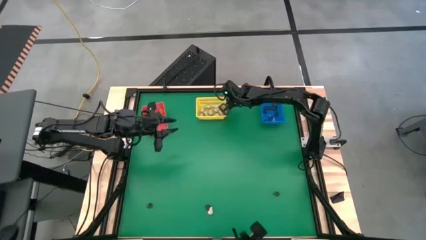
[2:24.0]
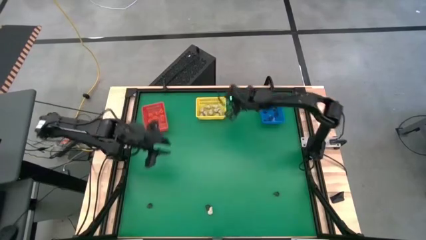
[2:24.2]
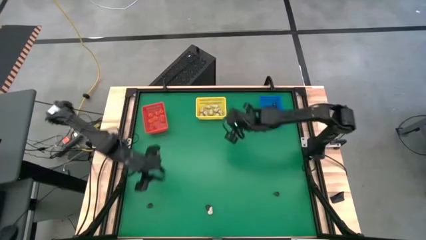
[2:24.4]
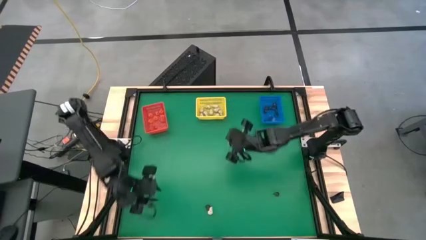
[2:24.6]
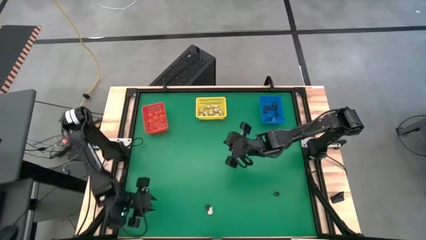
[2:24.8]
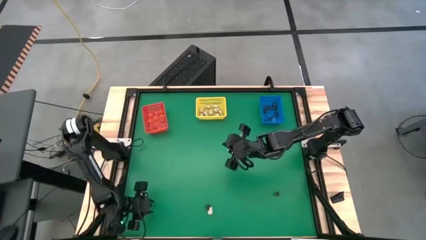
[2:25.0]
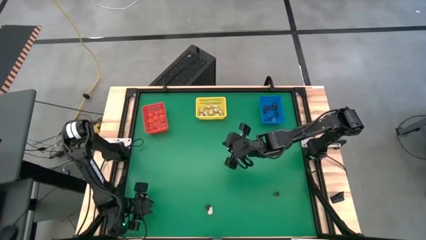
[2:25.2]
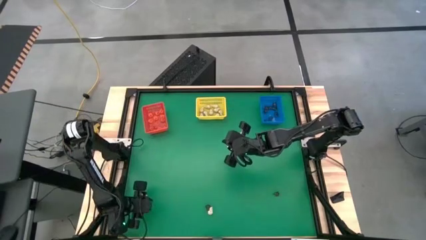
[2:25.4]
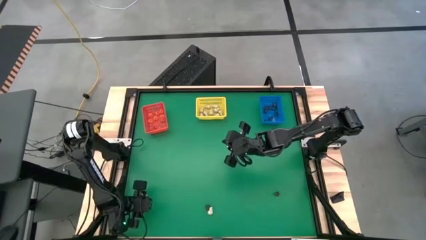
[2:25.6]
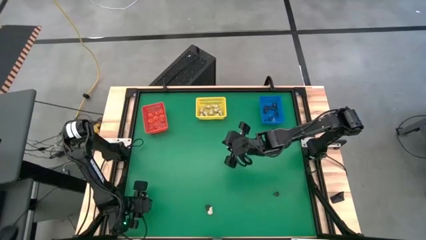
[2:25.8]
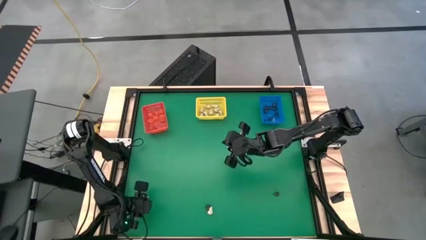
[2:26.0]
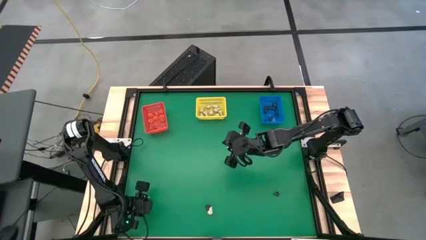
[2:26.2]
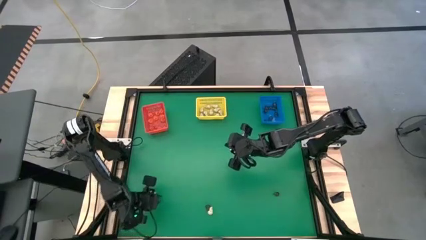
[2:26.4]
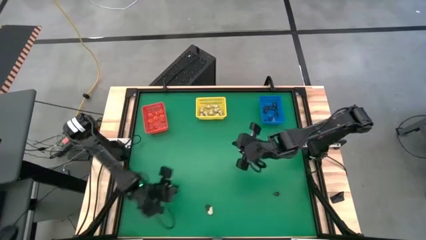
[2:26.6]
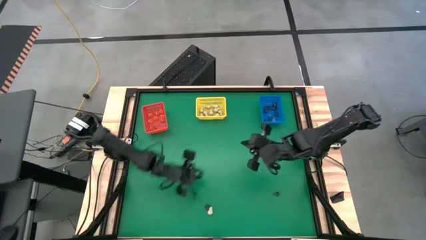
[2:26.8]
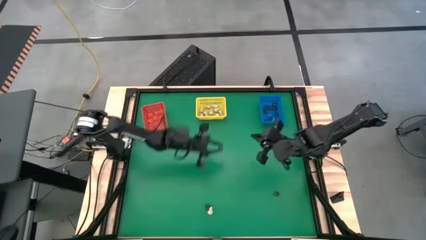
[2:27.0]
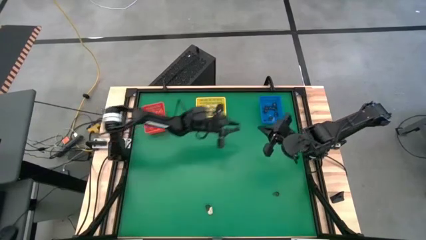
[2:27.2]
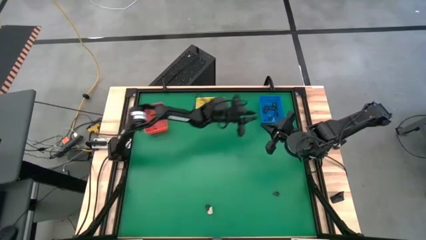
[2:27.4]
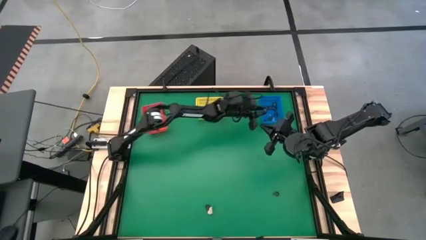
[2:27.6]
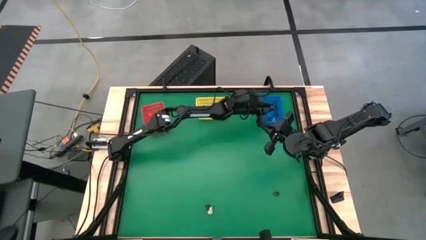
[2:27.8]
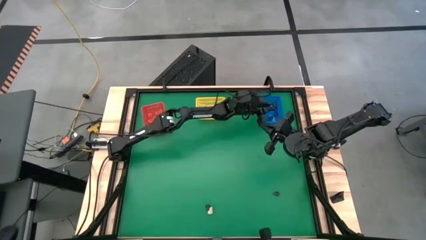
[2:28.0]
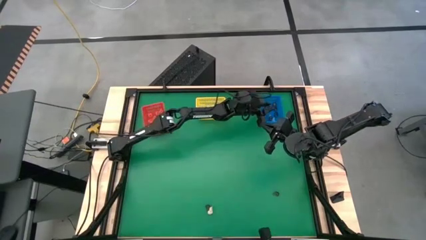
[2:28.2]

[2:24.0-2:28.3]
Task: Sort Halloween decoration
Put the purple skull toy into the blue bin

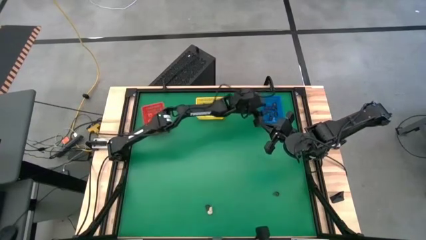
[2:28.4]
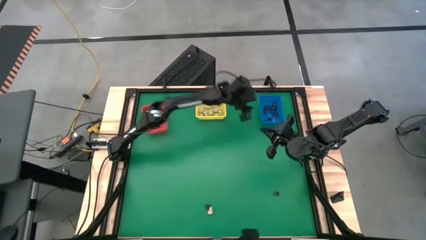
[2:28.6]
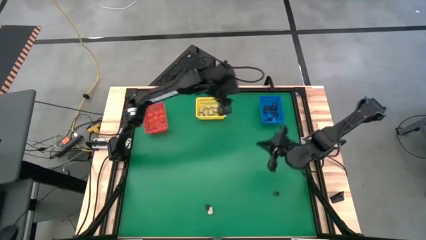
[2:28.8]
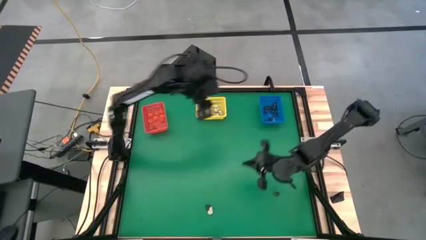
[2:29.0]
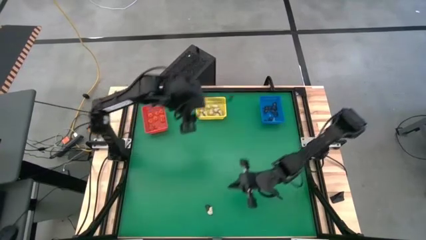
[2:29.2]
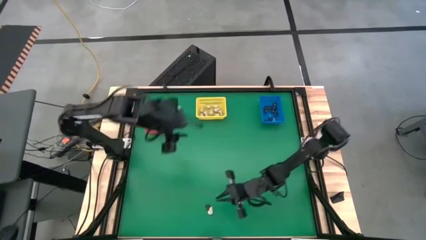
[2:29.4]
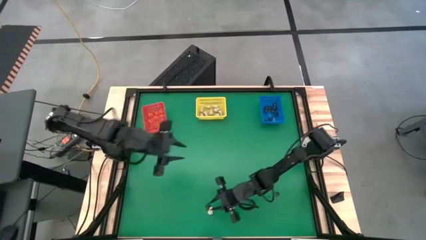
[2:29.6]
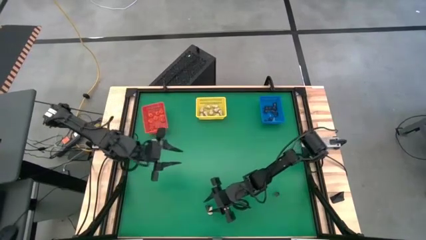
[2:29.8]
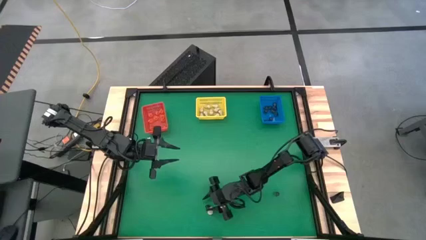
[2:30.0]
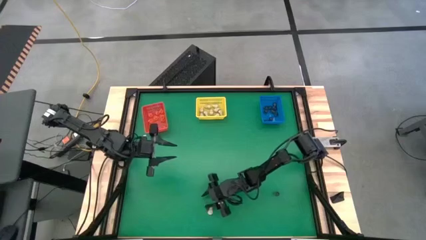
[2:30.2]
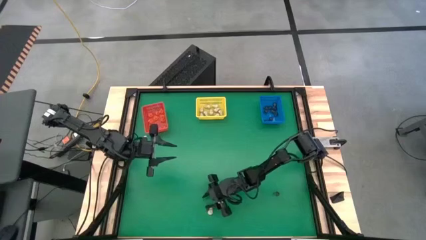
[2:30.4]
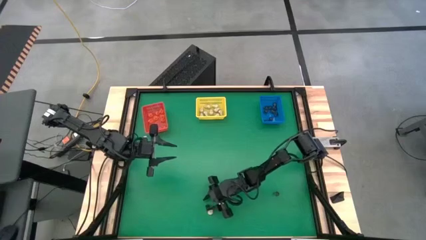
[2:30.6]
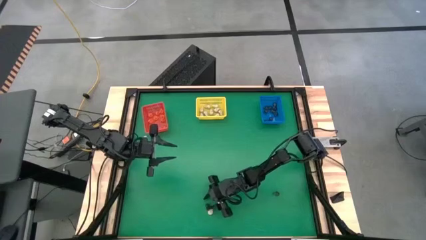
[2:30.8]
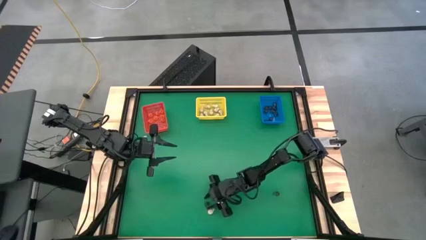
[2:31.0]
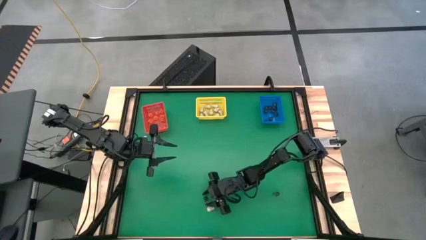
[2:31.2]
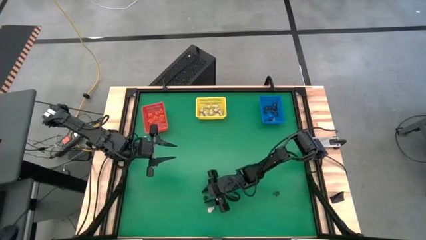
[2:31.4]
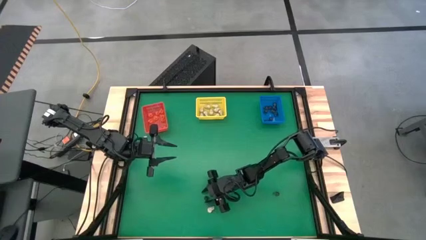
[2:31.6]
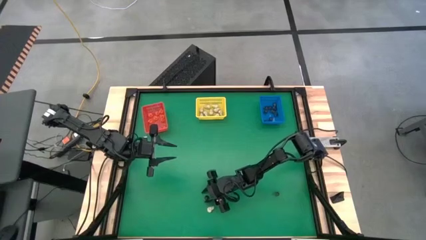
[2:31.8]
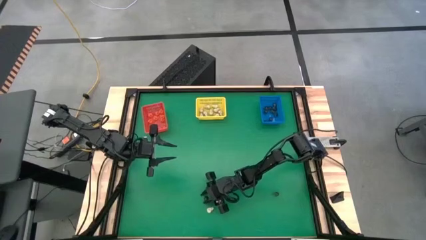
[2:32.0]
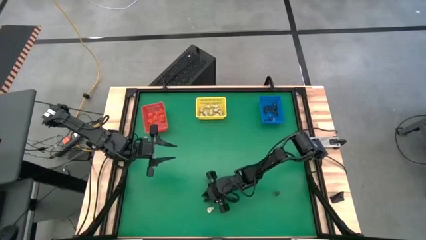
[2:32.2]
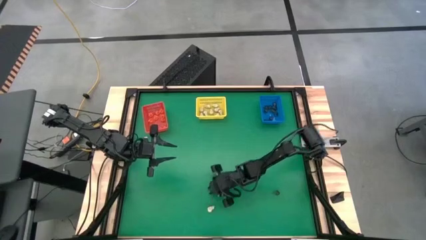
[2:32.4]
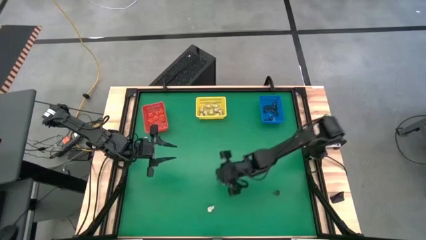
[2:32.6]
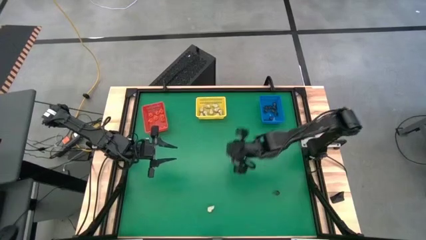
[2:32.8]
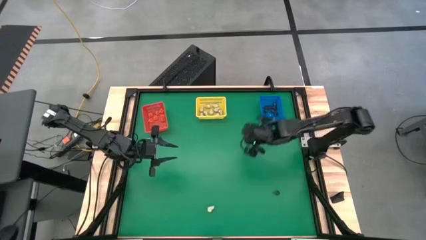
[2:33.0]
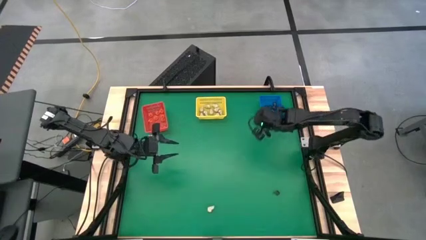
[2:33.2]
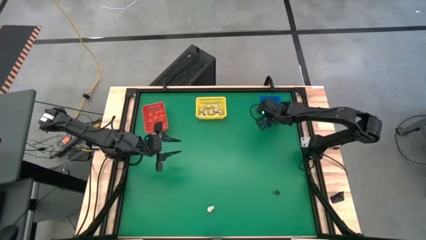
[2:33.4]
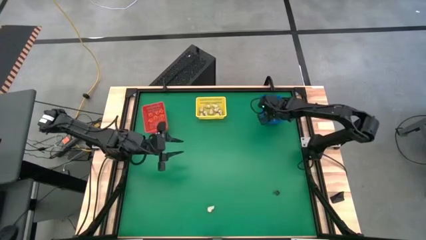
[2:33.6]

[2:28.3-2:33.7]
Put the purple skull toy into the blue bin

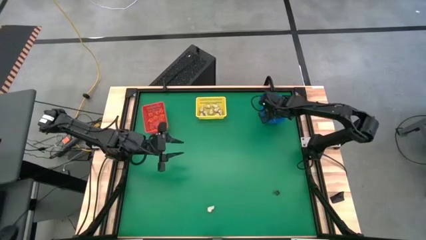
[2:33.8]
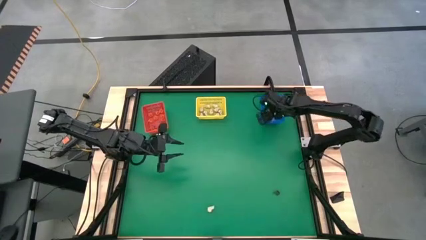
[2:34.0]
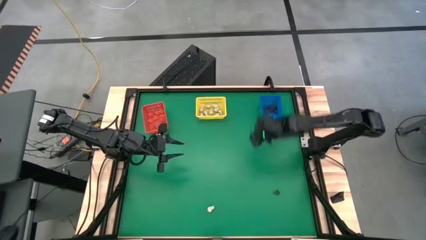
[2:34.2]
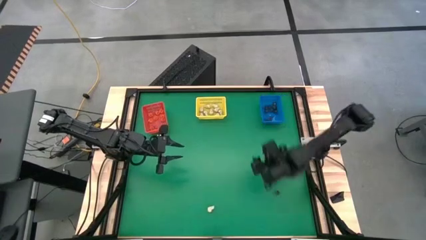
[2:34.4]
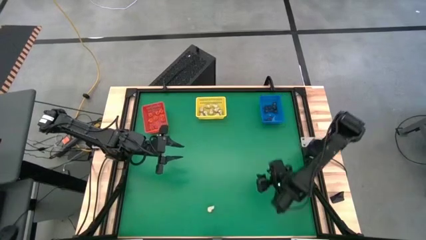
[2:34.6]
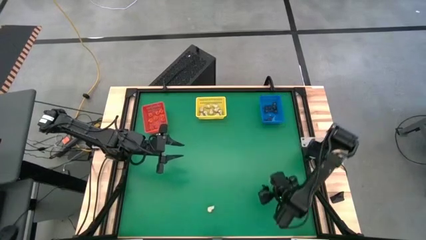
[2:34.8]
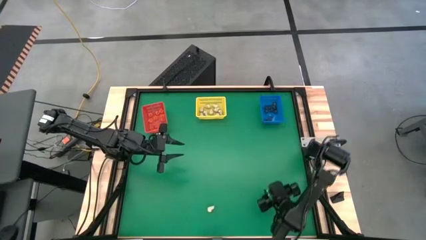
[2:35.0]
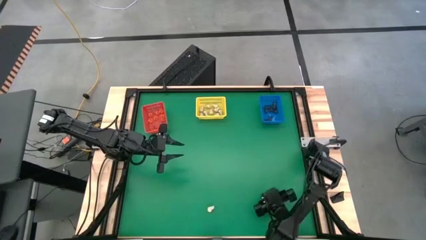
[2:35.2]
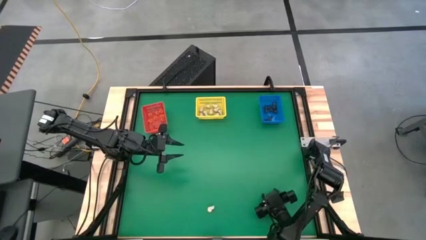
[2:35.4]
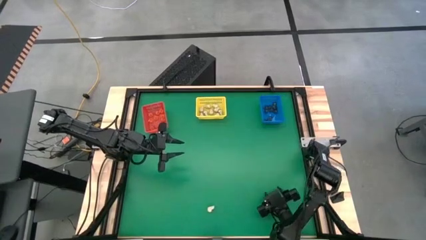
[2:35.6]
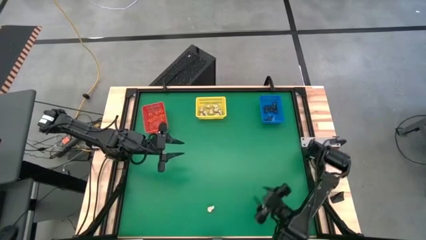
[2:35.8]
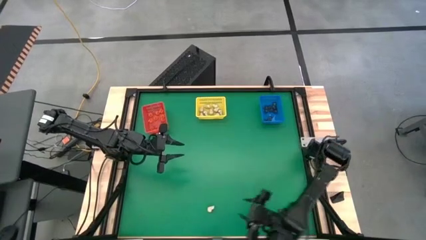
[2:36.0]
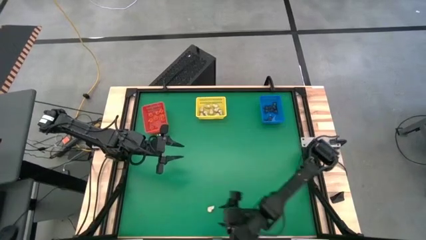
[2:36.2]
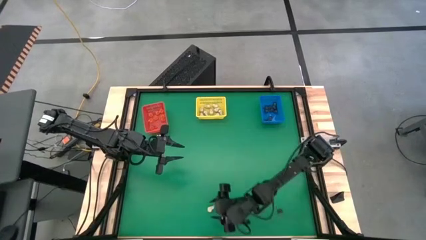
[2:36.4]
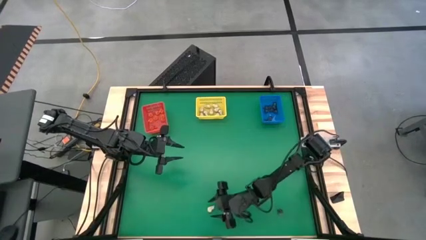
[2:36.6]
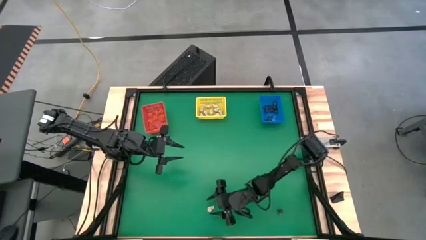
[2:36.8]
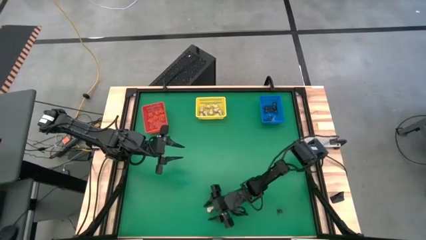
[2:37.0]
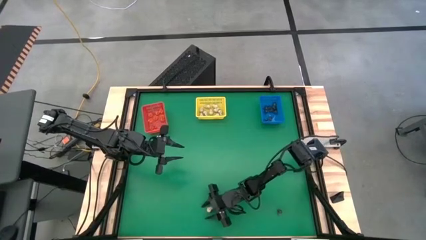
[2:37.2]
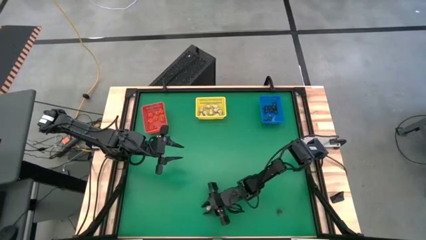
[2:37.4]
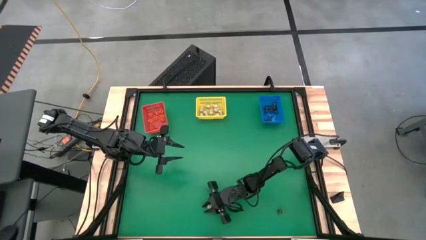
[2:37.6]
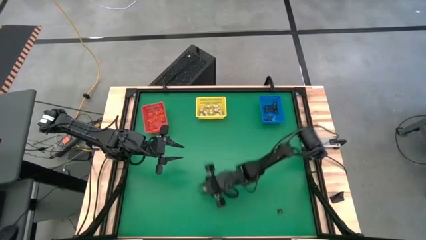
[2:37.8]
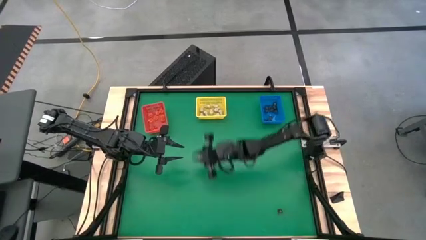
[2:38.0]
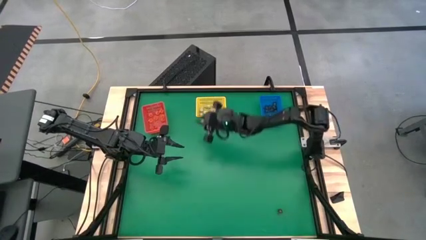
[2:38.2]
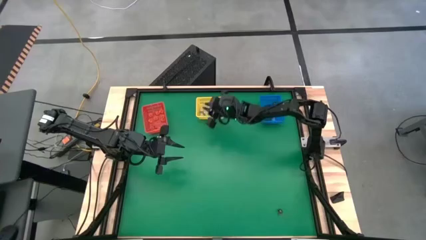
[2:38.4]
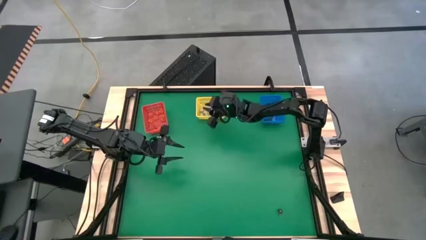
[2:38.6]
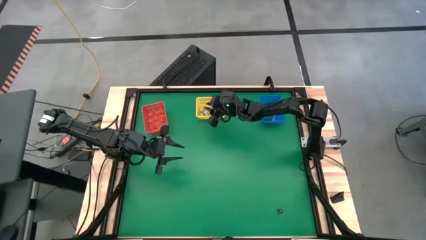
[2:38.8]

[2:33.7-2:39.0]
Put the white skull toy into the yellow bin

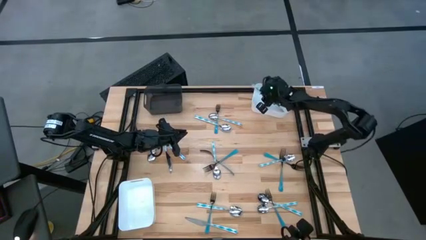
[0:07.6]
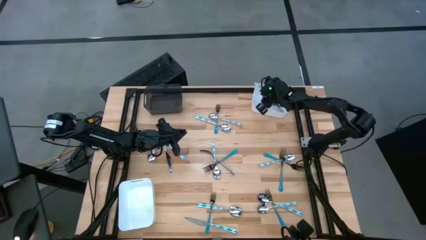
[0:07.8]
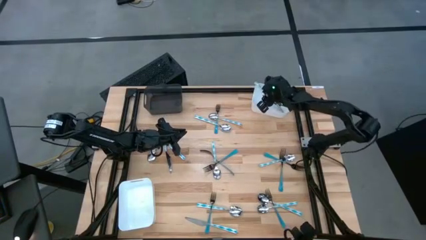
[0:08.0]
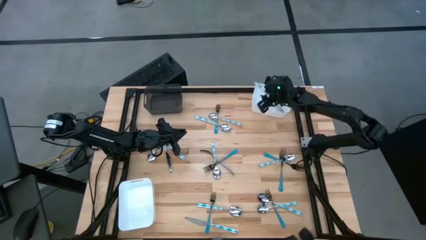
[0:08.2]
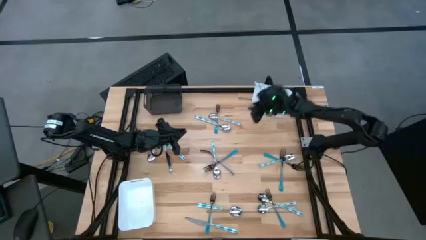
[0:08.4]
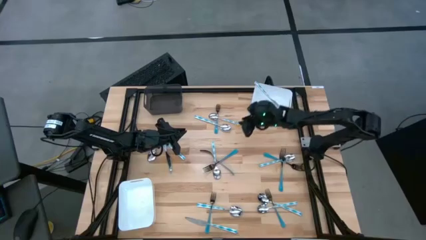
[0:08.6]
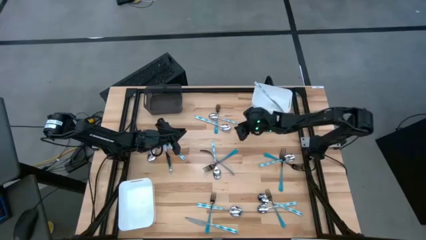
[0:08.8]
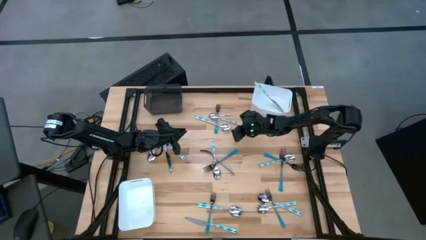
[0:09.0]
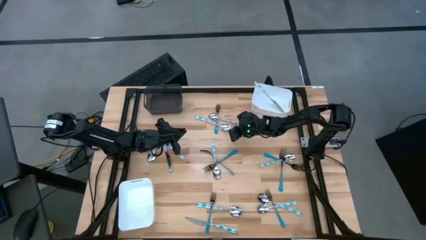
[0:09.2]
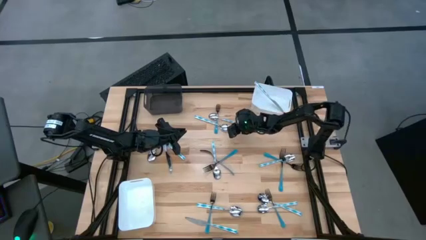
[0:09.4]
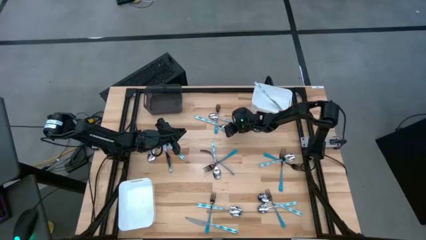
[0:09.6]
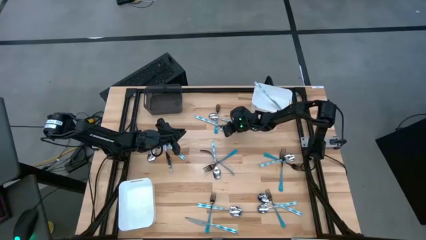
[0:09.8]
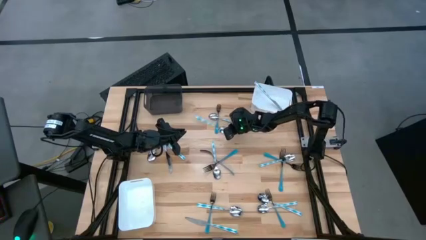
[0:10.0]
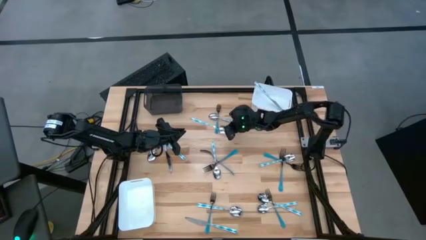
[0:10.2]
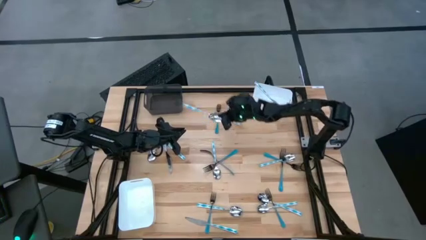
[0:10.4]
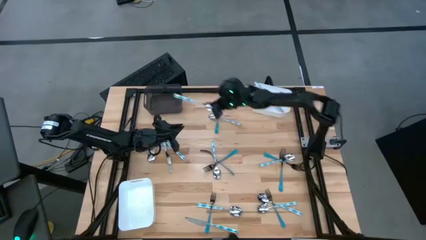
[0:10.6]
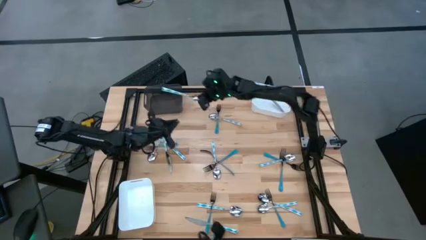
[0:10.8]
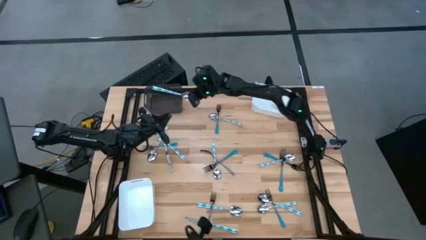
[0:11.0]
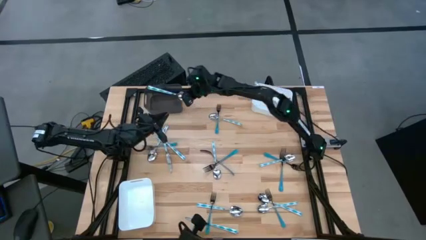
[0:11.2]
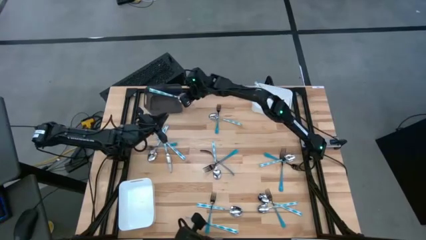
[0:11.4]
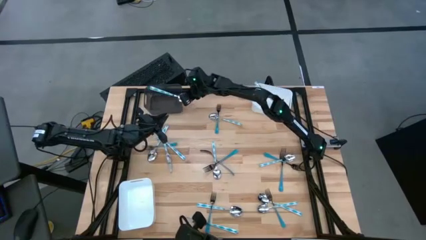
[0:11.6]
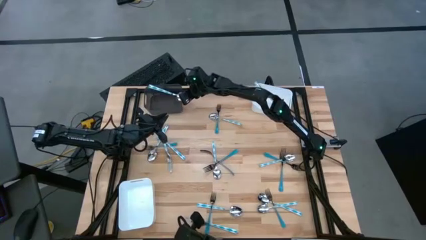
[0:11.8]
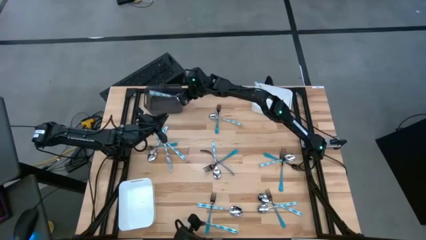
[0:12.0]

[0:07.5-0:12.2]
Task: Sort silverware by color (type)
Put the blue patterned spoon into the black bin
